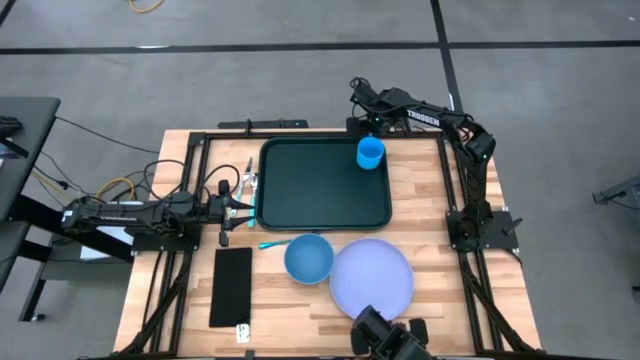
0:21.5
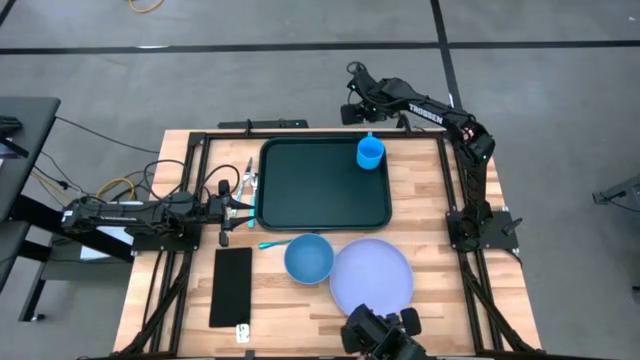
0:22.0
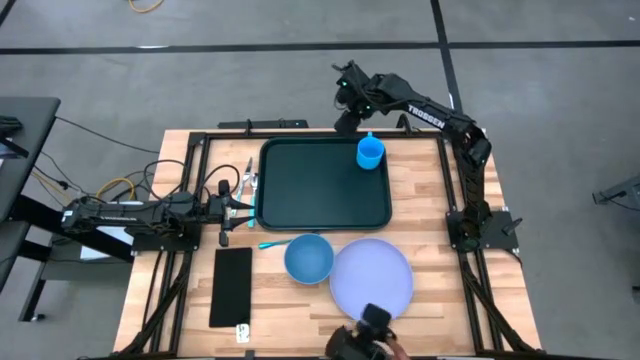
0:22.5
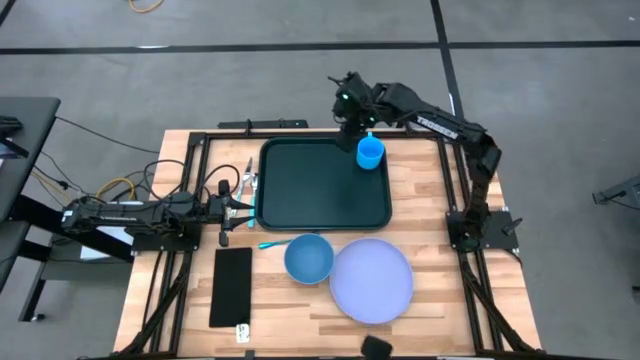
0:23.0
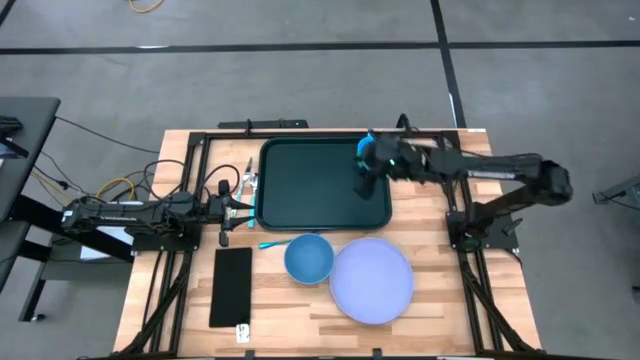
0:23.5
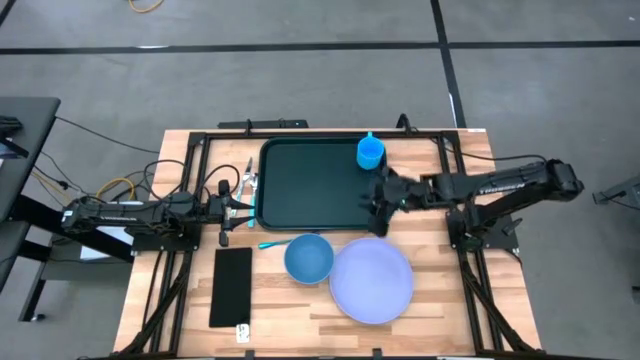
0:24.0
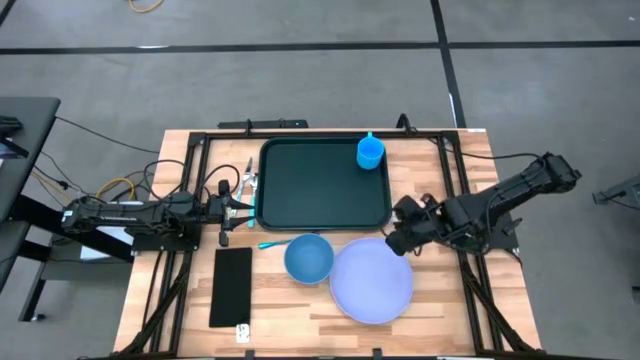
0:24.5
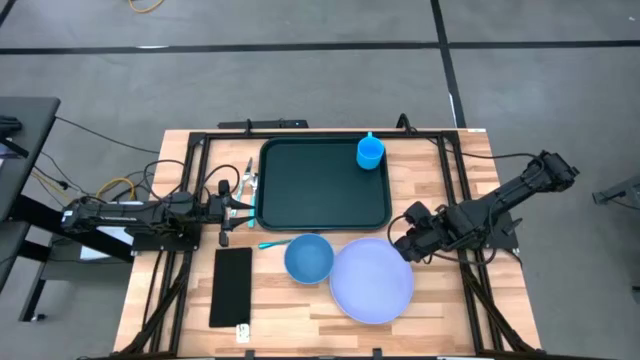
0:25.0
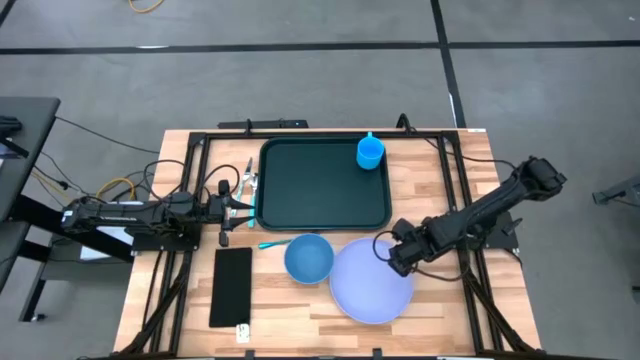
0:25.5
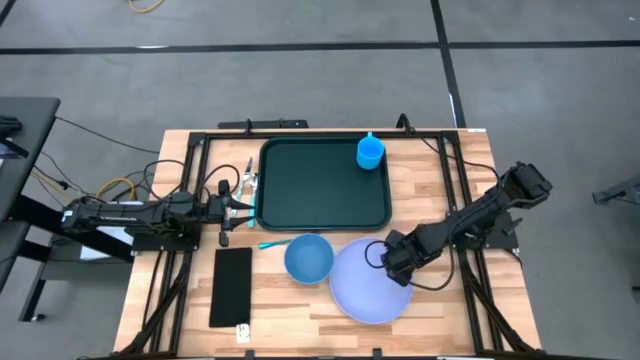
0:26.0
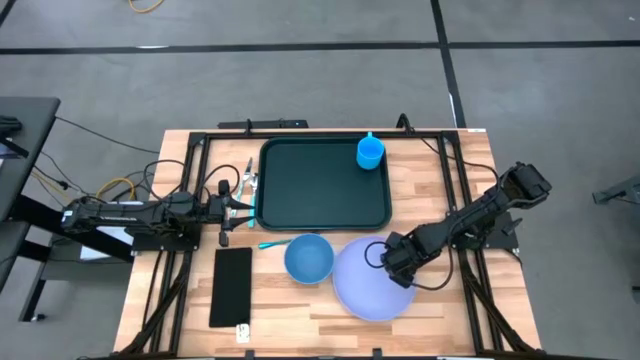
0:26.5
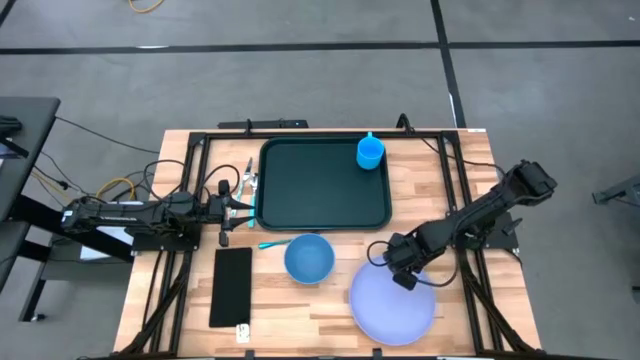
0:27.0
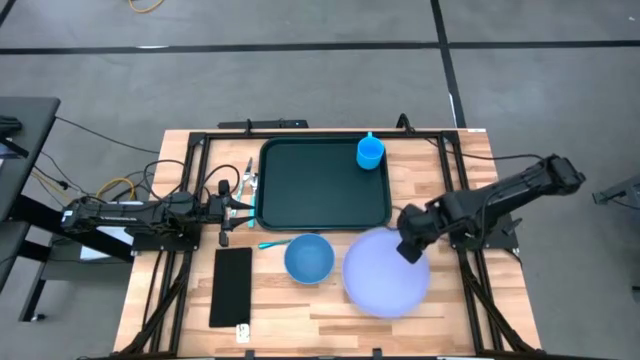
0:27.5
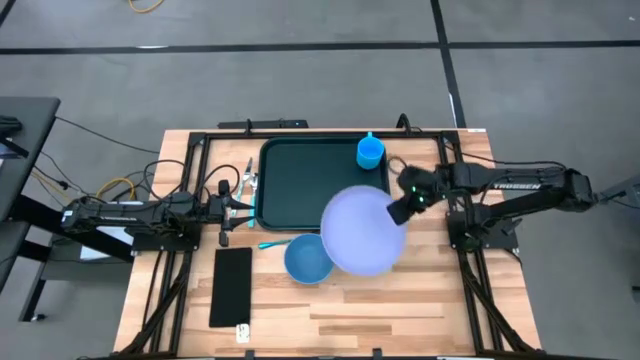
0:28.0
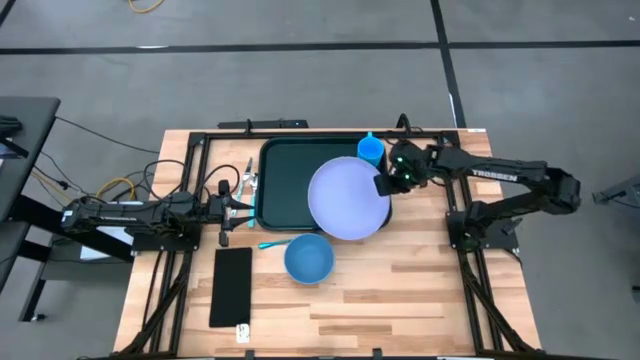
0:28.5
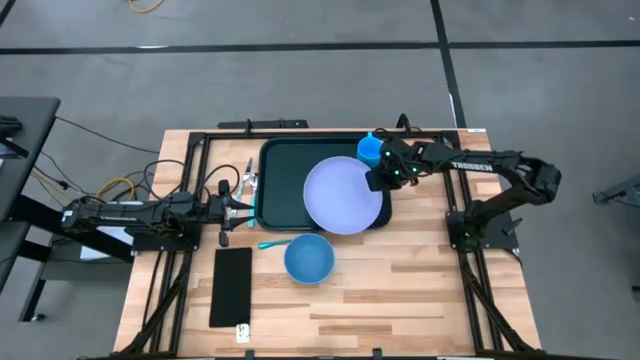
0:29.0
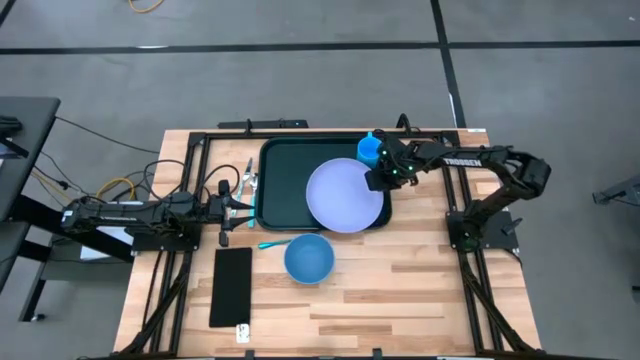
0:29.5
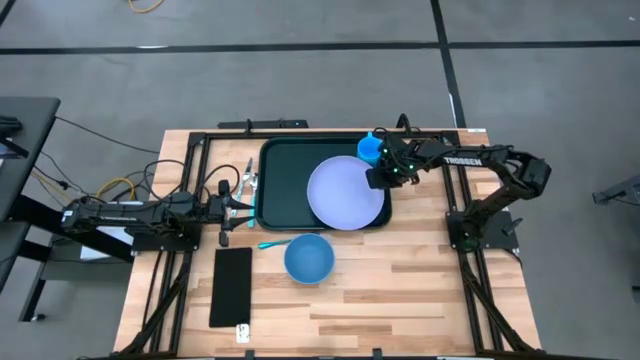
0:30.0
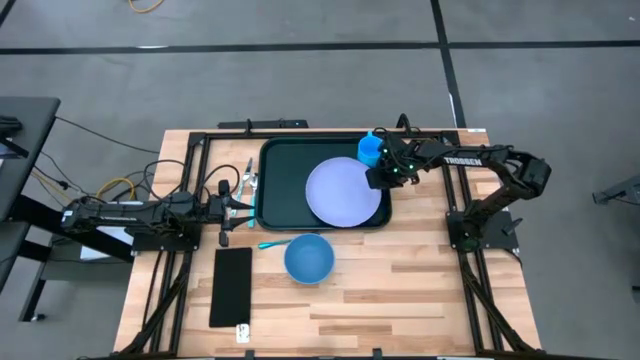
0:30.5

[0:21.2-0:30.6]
Task: Set up tray
Put the purple plate on the black serving tray to the bottom left of the light blue mug

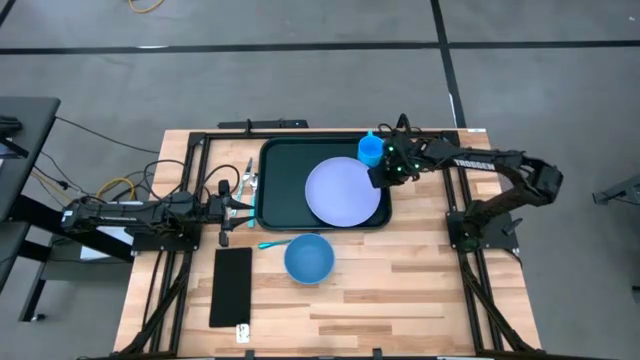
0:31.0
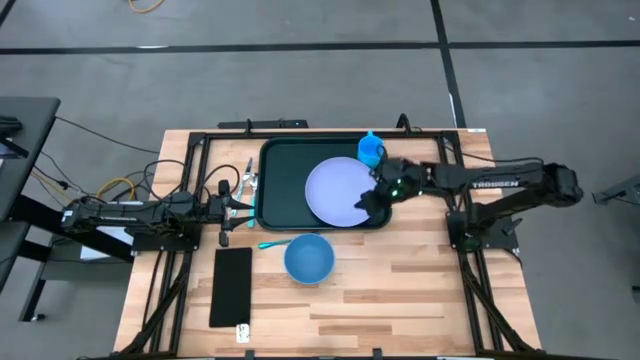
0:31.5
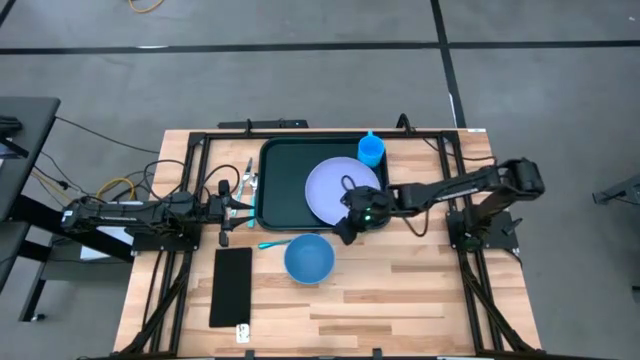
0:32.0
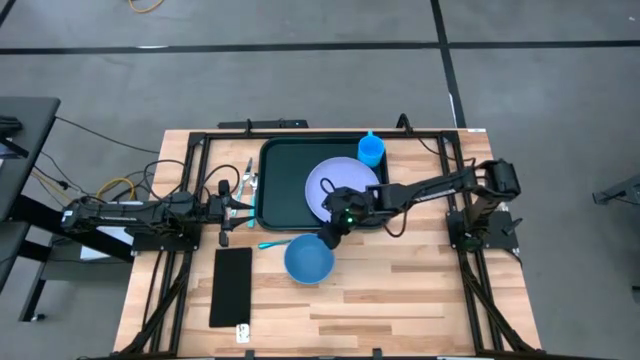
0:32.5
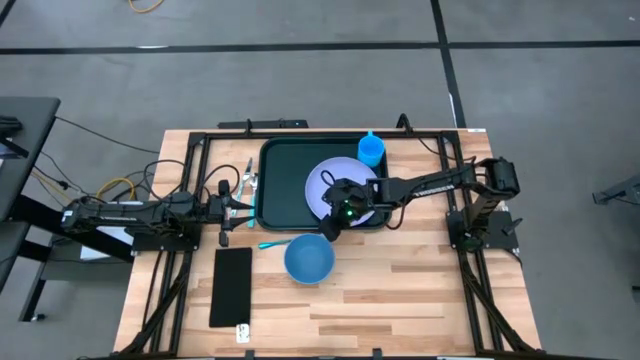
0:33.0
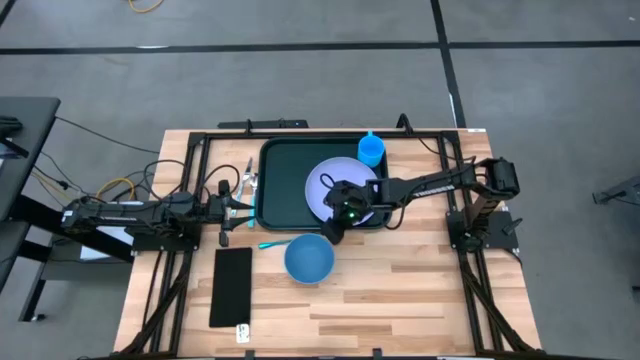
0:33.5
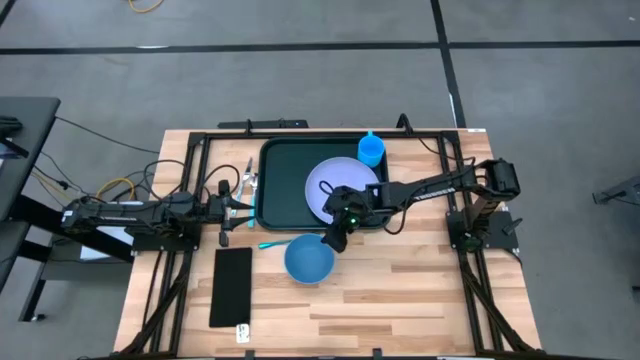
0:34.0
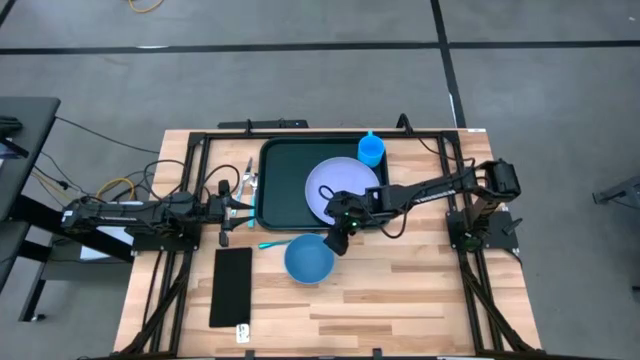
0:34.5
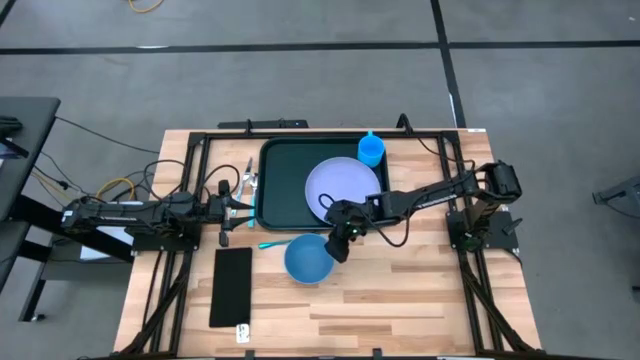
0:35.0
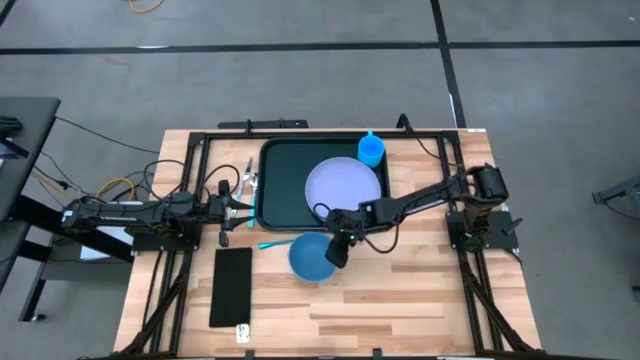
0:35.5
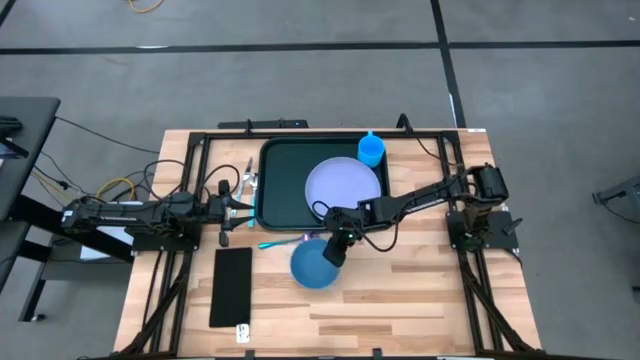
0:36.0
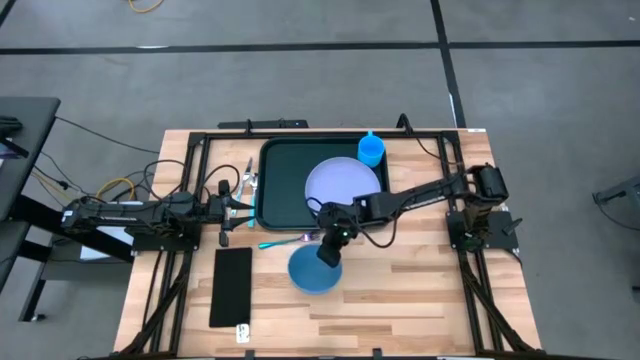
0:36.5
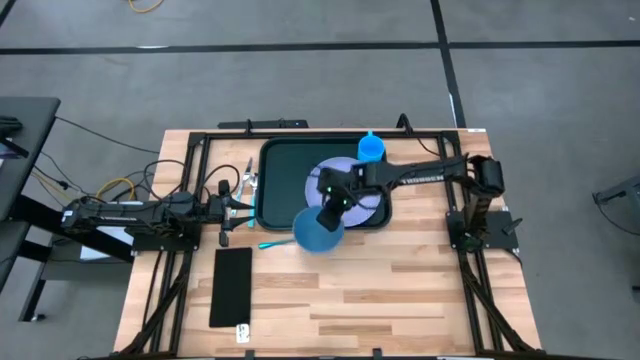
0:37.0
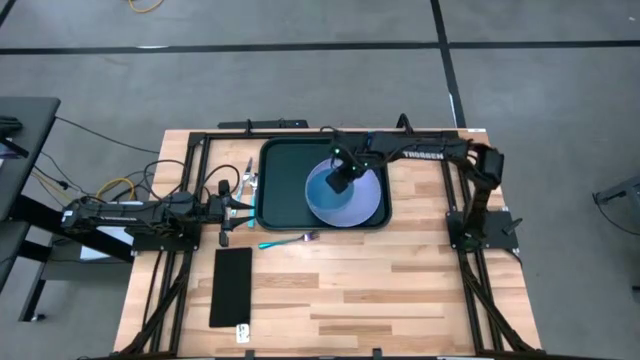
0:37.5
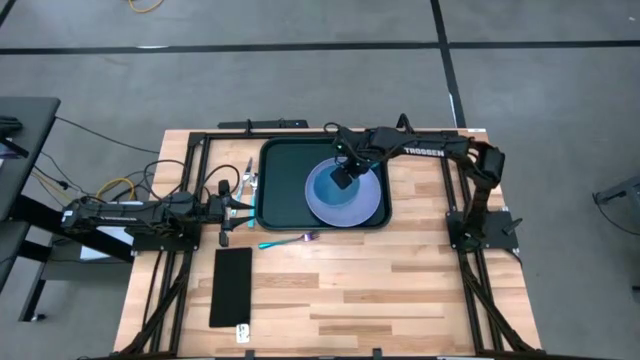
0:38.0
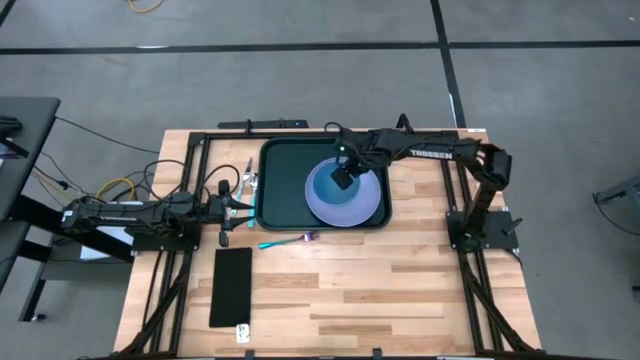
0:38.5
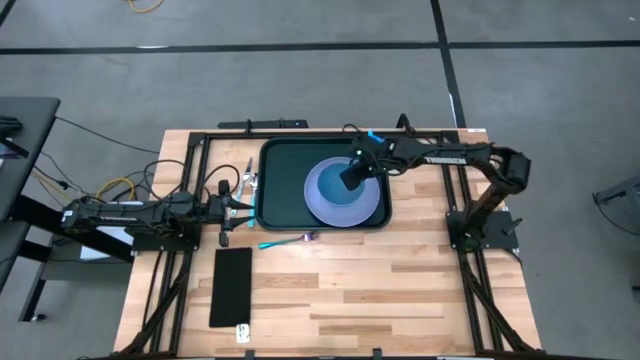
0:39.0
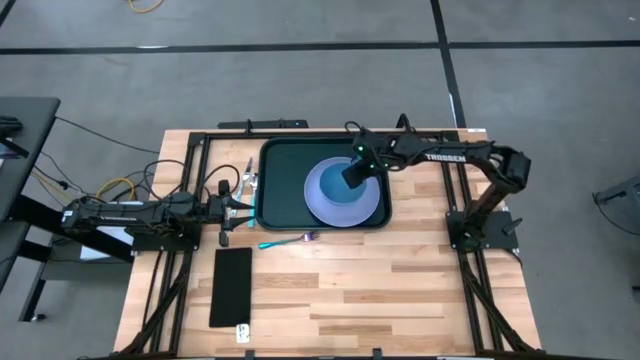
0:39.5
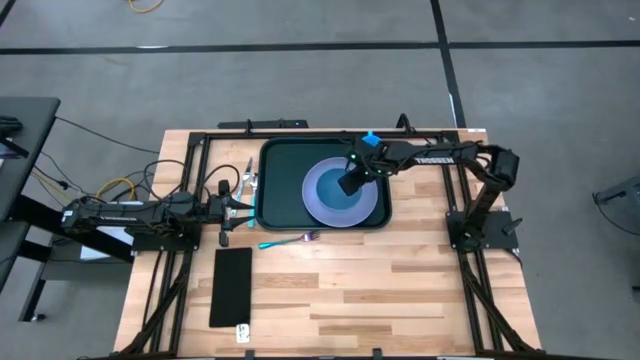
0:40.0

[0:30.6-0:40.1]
Put the blue bowl on the purple plate

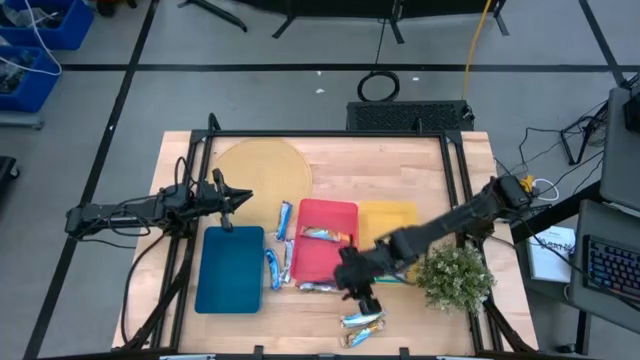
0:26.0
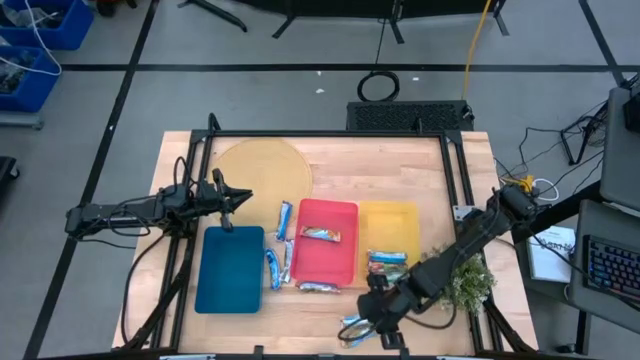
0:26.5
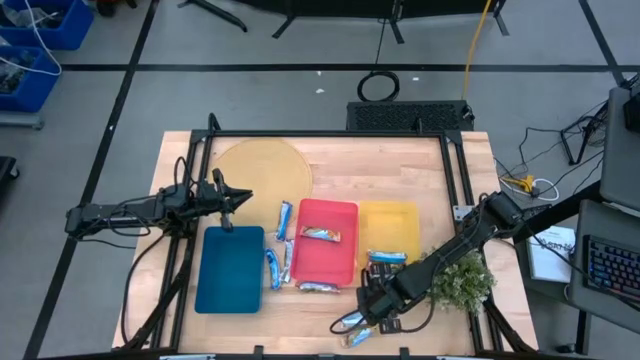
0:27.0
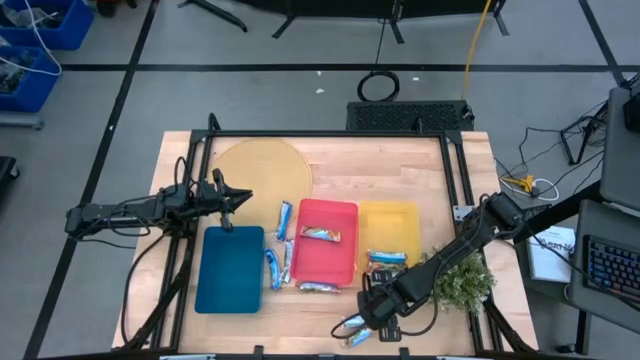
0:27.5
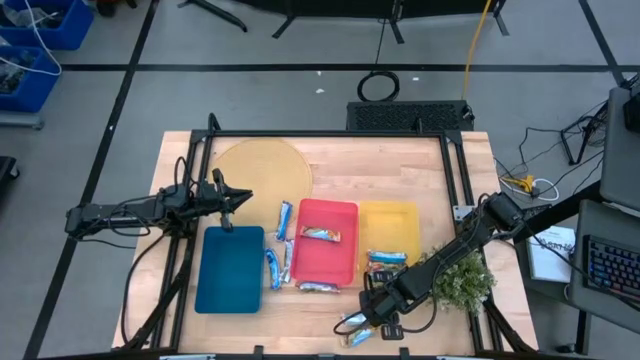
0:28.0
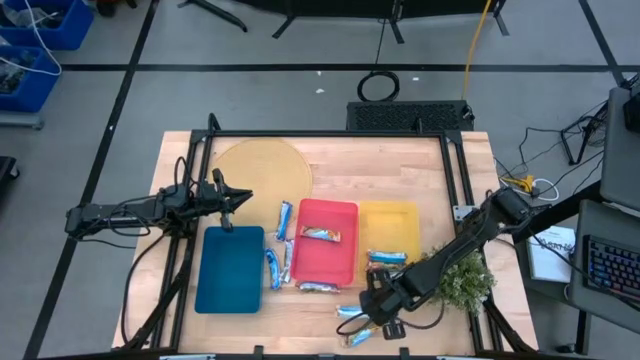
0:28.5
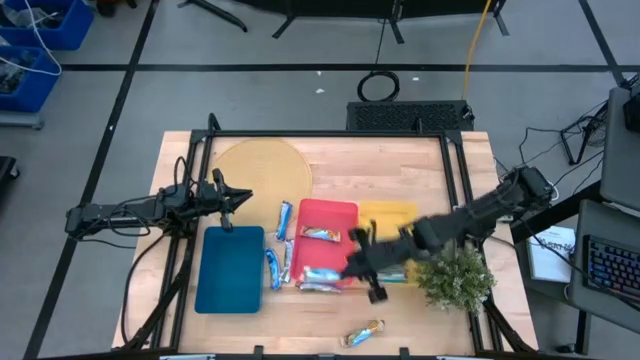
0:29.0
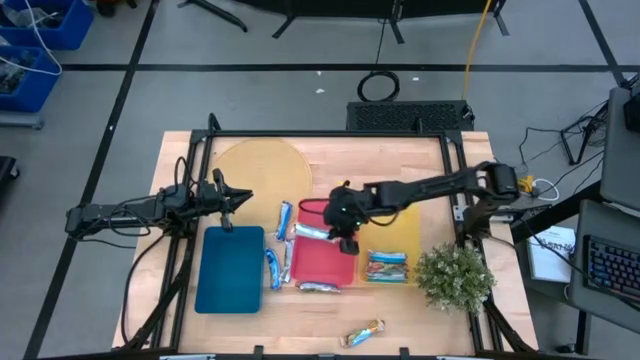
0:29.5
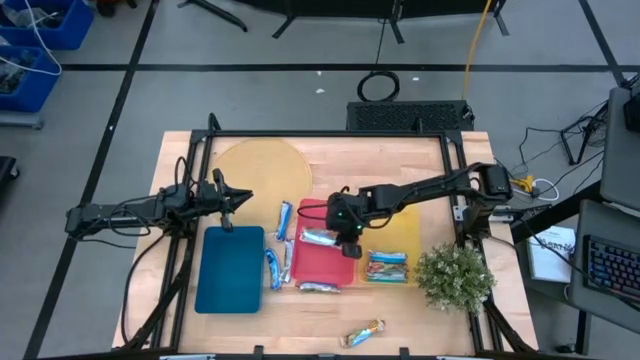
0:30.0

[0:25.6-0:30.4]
Task: Pick and place Granola Bars by type
Put the yellow granola bar into the red bin
